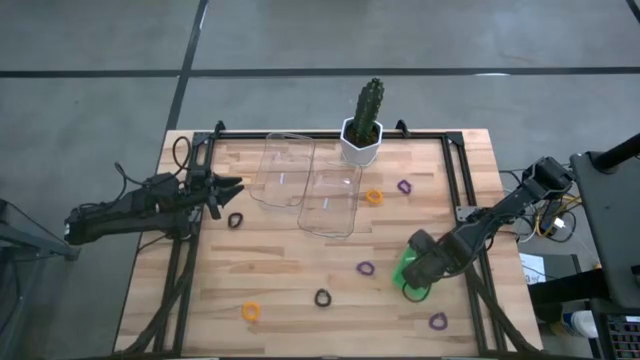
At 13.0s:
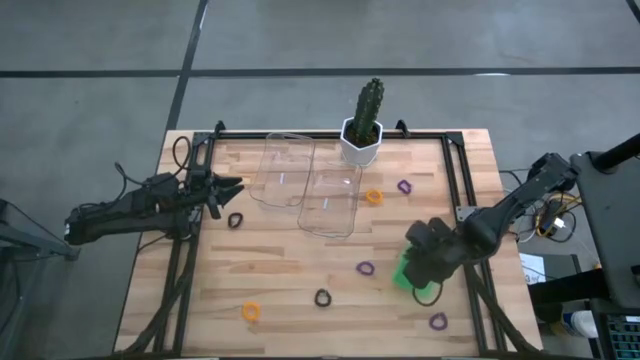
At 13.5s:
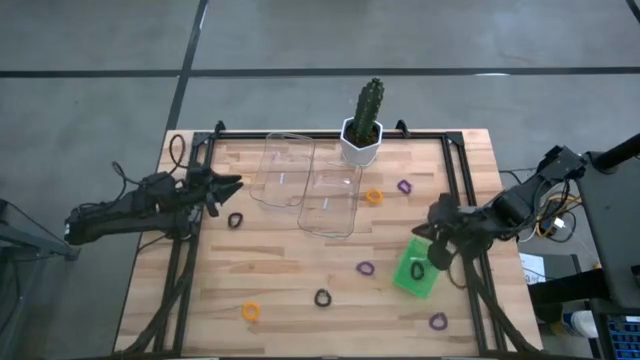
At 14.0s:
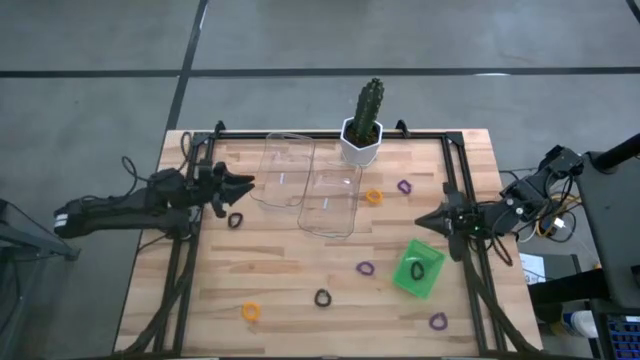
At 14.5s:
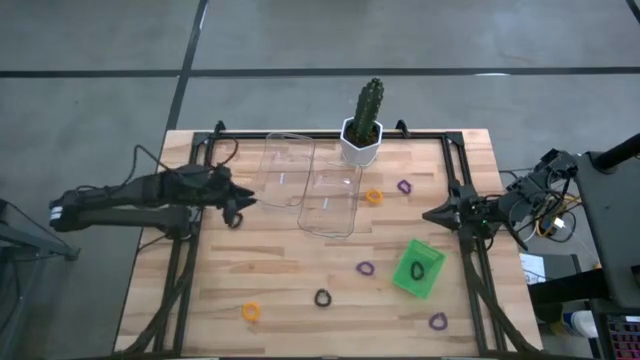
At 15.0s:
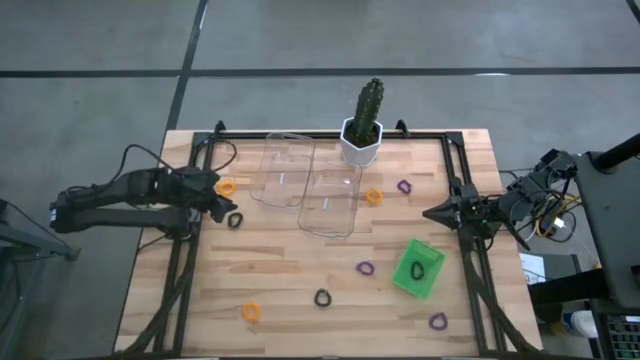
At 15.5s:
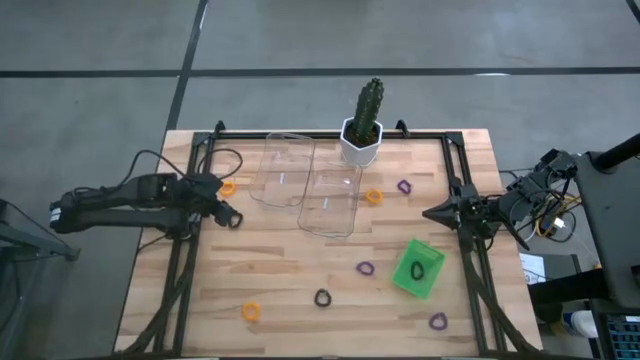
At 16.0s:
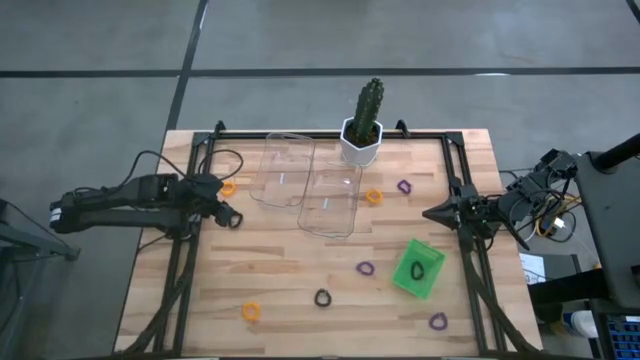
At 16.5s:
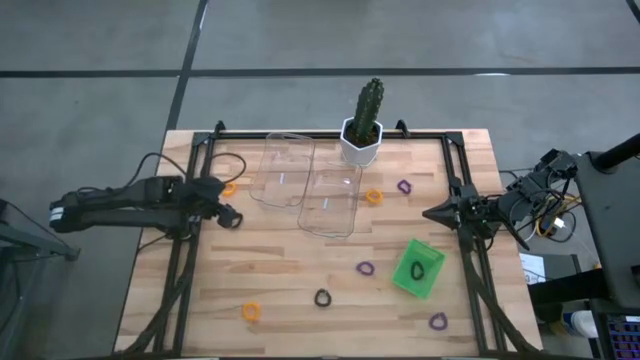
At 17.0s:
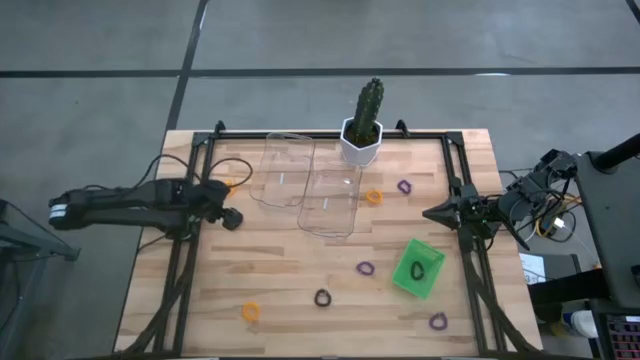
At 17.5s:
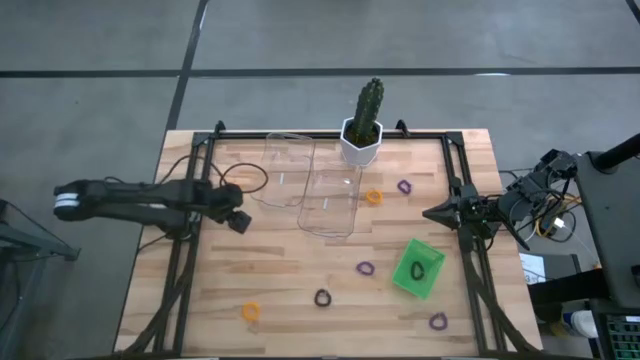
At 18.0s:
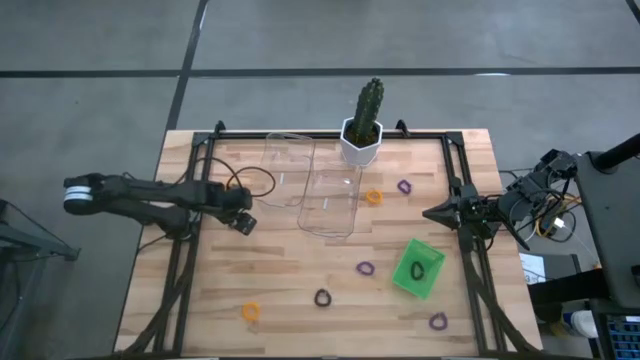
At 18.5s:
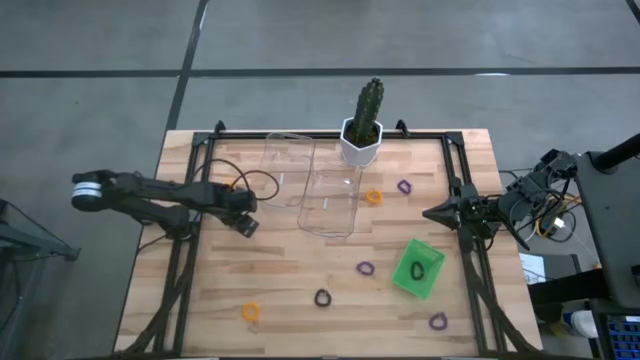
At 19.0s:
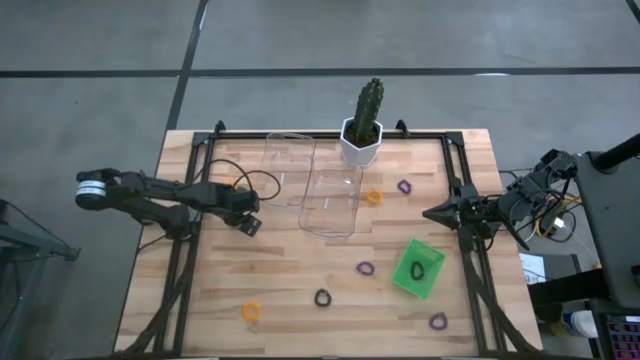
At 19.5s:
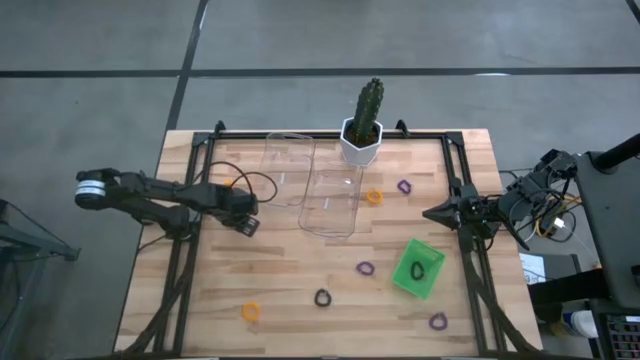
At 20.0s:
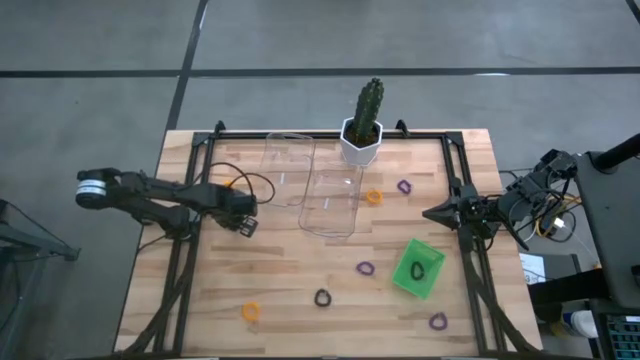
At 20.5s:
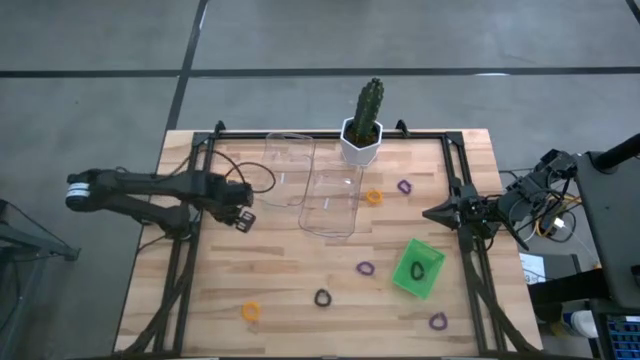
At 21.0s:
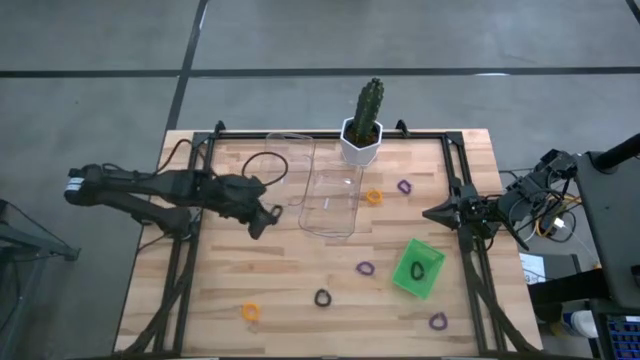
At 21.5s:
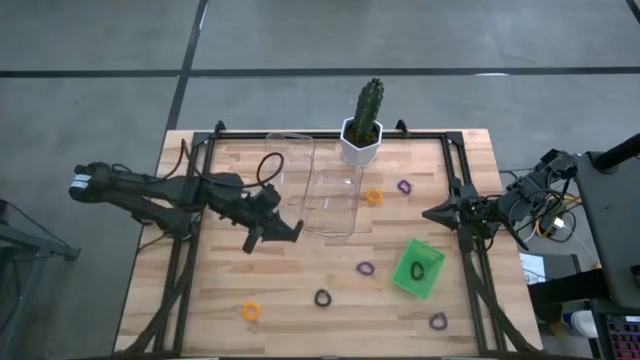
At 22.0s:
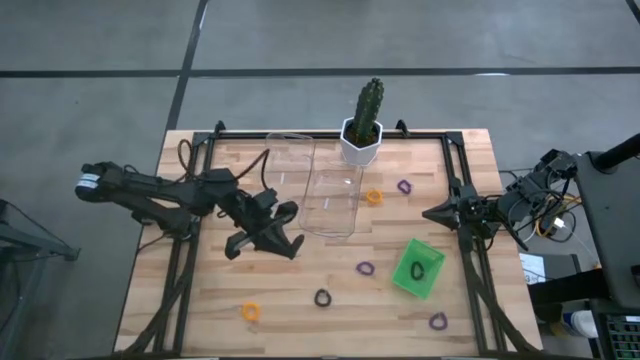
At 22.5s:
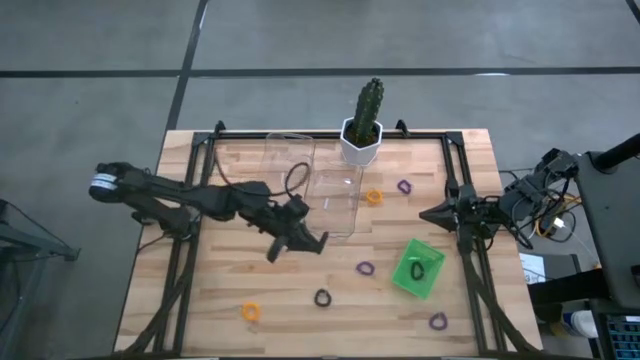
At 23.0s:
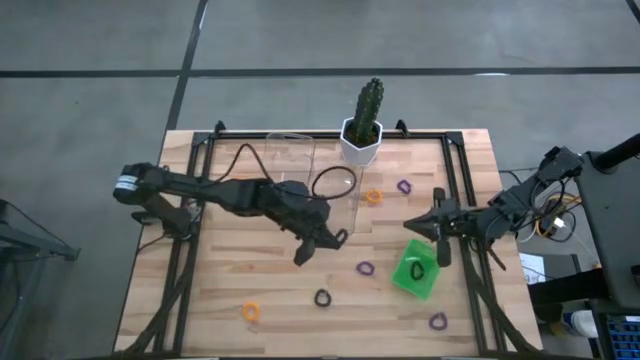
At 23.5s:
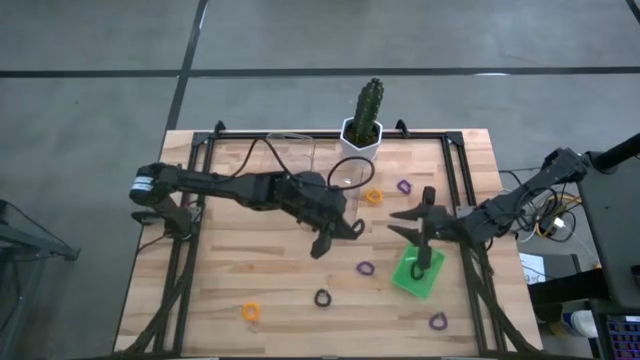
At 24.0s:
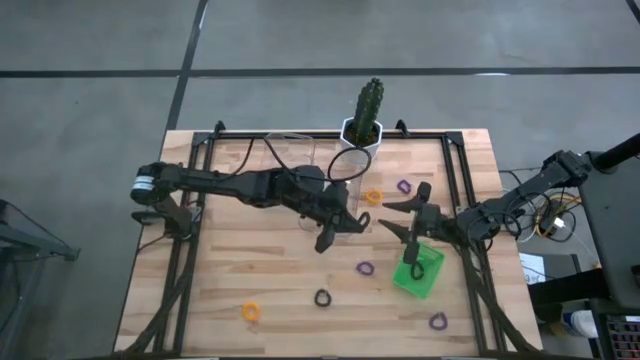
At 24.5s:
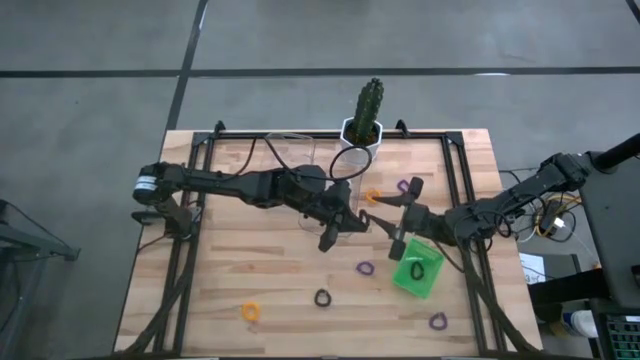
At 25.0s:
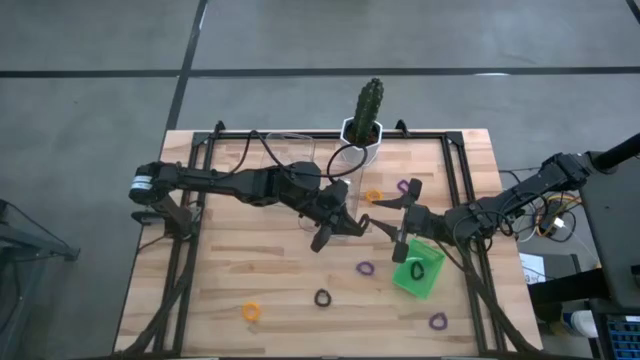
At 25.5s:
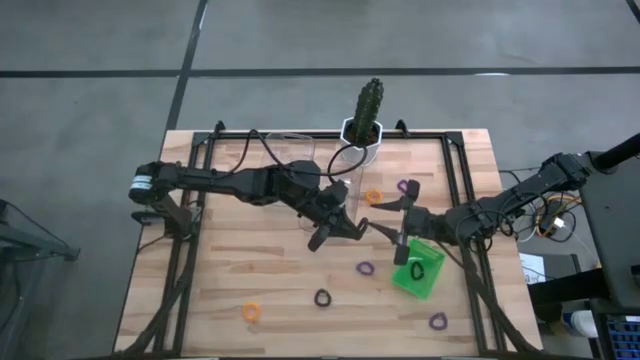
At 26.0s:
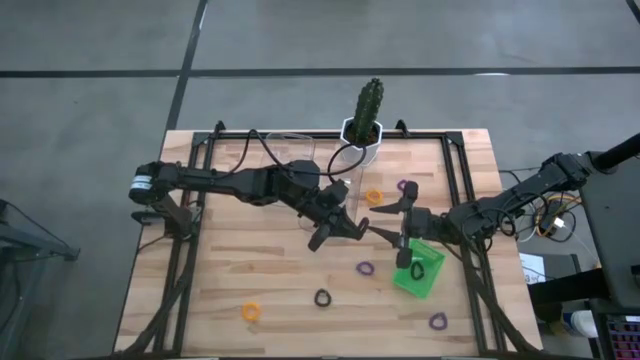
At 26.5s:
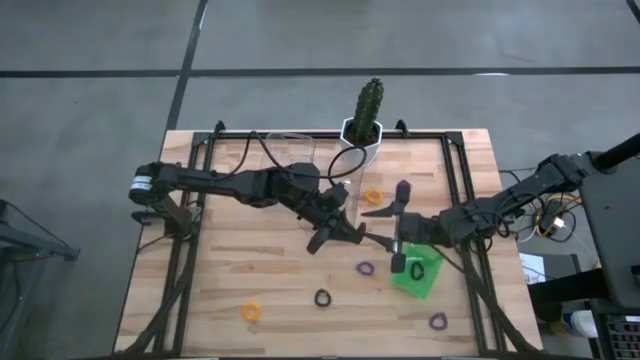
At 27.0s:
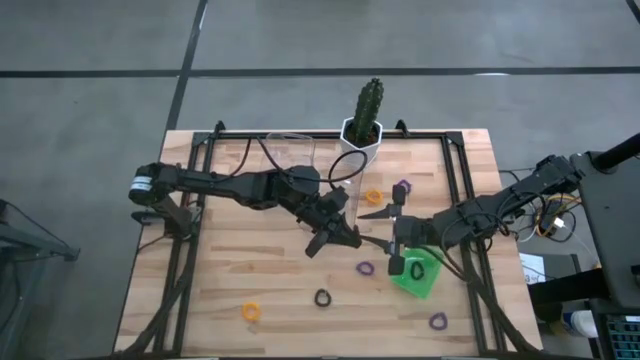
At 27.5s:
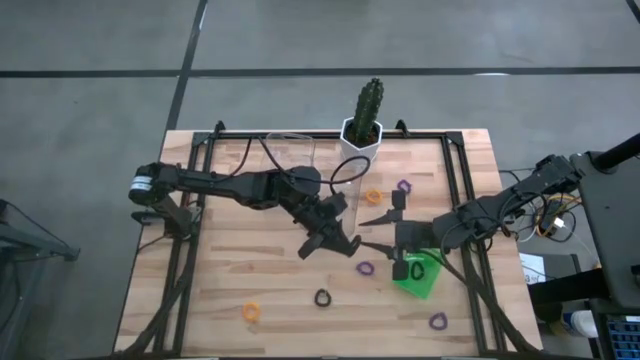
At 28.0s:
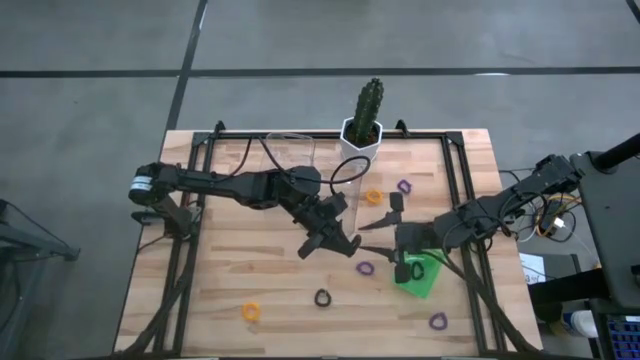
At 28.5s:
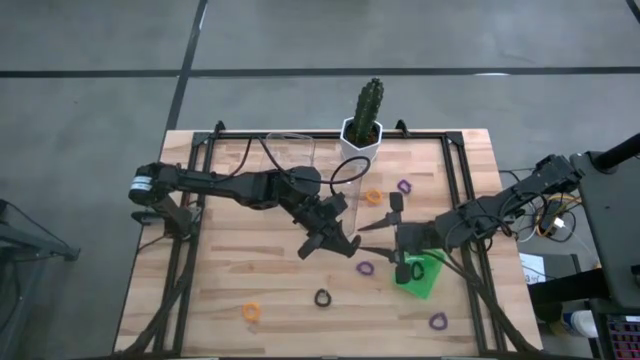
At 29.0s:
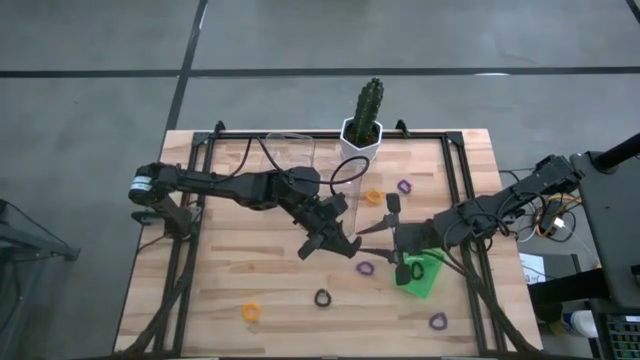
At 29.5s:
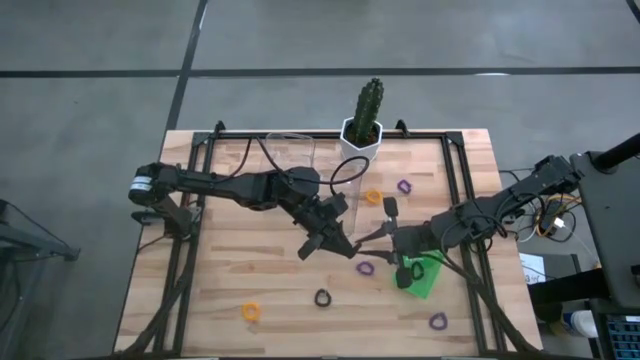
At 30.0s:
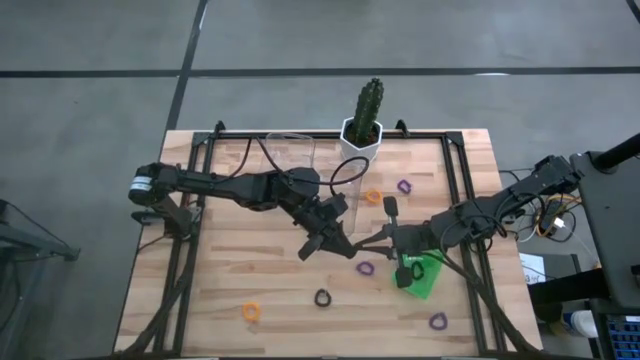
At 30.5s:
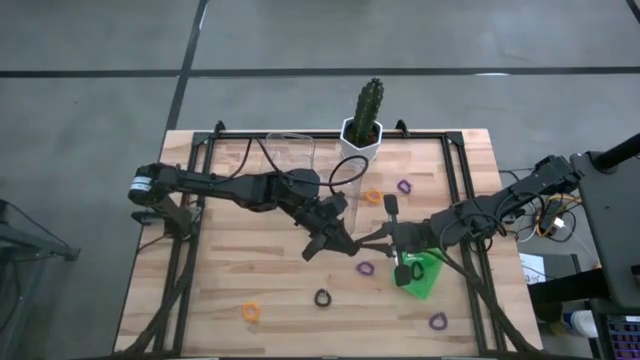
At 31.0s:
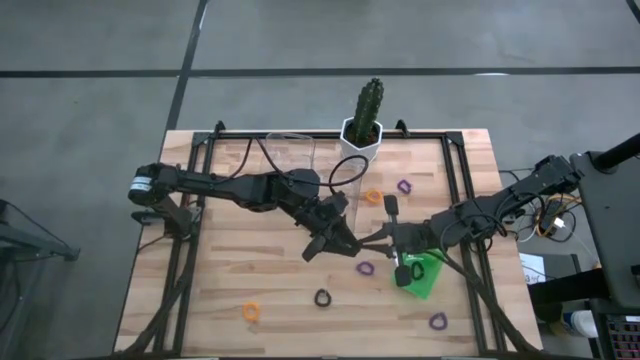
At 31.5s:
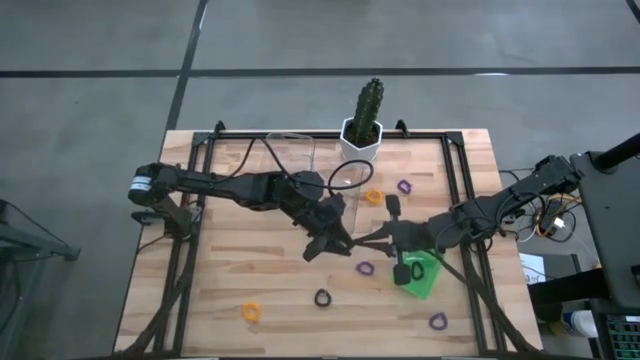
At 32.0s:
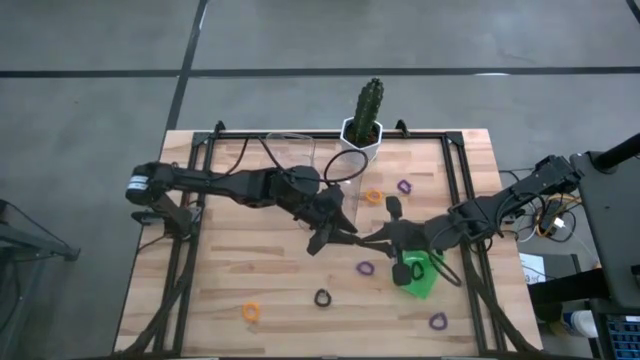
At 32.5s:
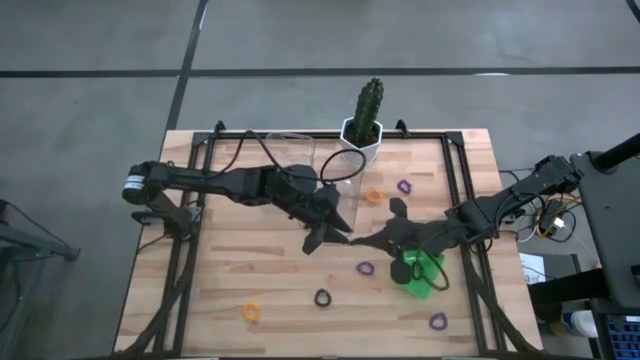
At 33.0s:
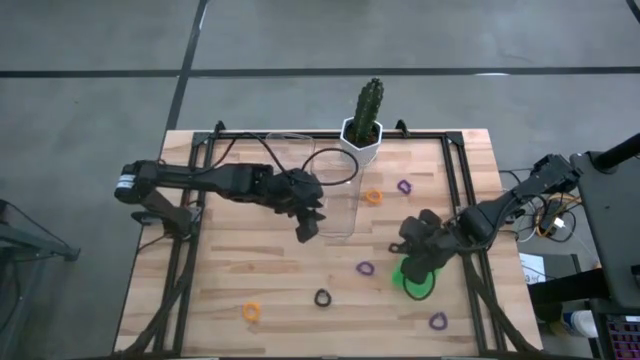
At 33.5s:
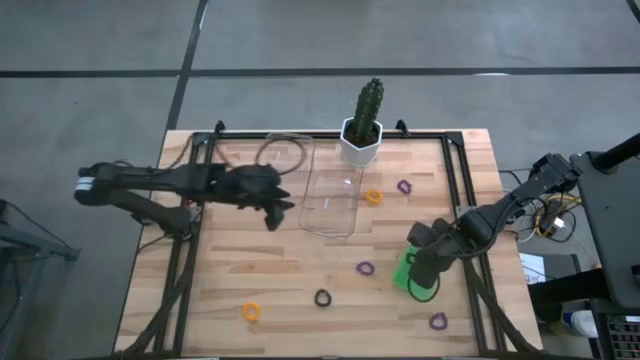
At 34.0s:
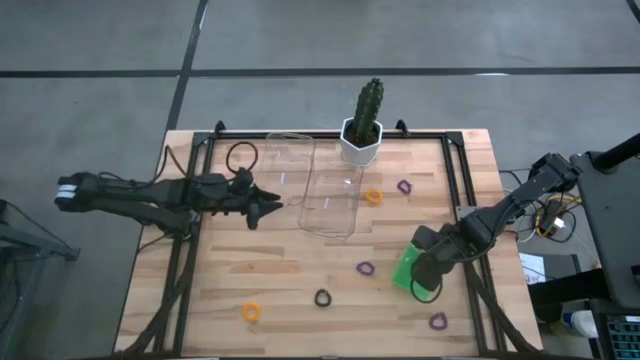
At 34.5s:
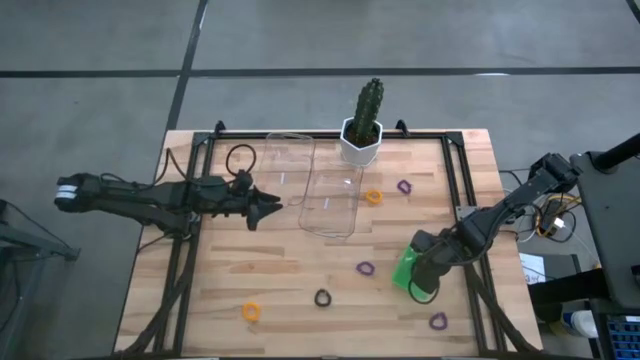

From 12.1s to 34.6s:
Task: Sort spring keychains
Put the top black spring keychain into the green bin
